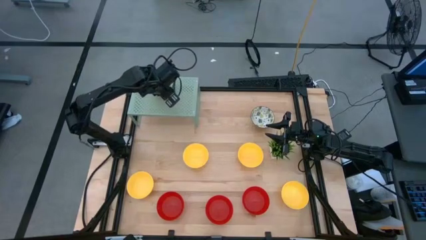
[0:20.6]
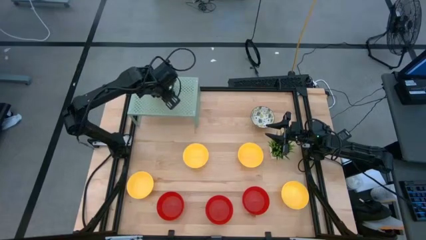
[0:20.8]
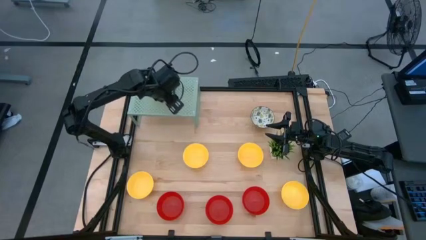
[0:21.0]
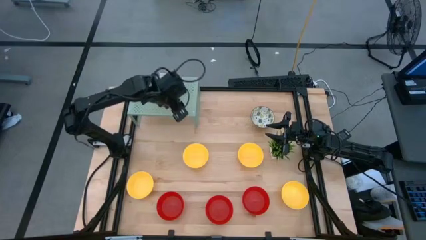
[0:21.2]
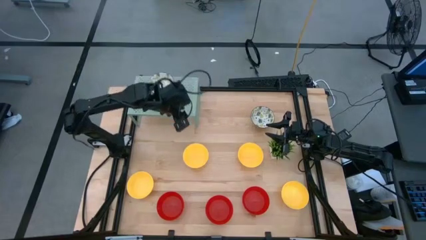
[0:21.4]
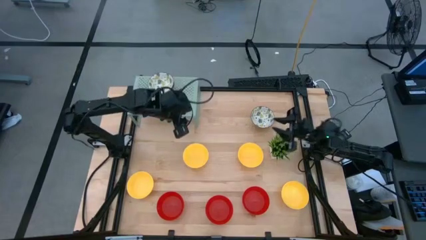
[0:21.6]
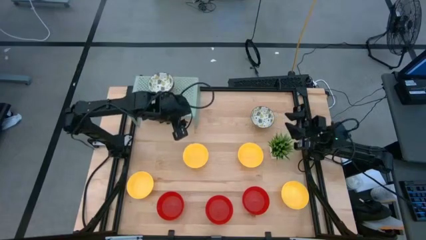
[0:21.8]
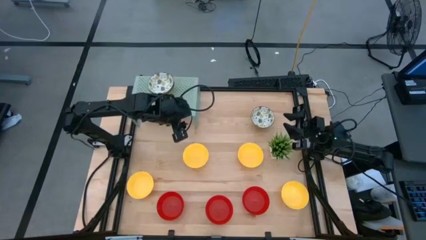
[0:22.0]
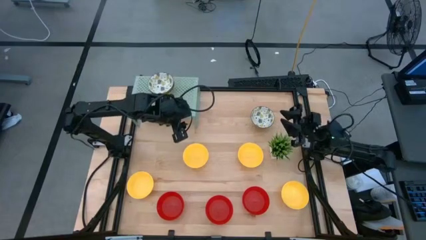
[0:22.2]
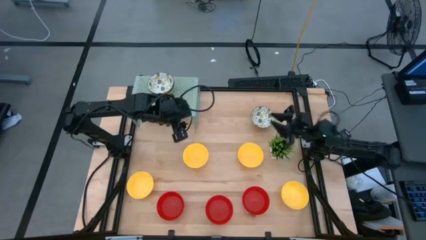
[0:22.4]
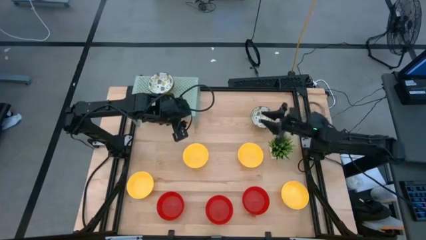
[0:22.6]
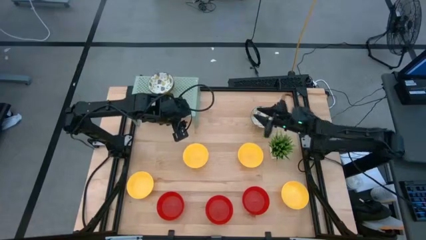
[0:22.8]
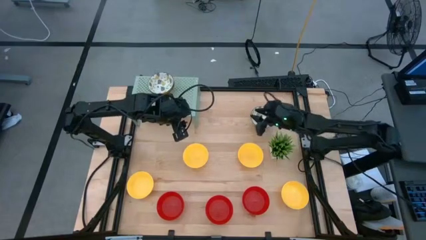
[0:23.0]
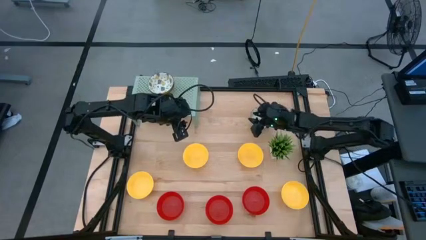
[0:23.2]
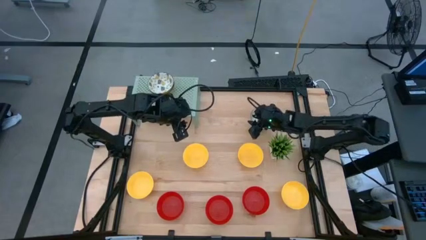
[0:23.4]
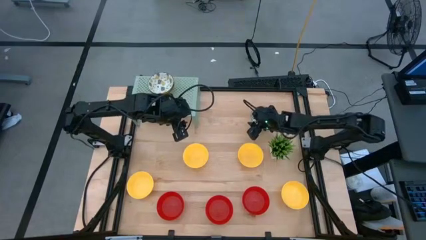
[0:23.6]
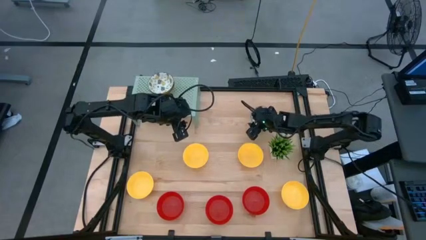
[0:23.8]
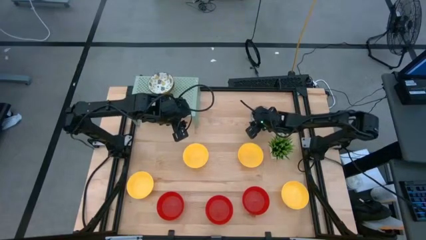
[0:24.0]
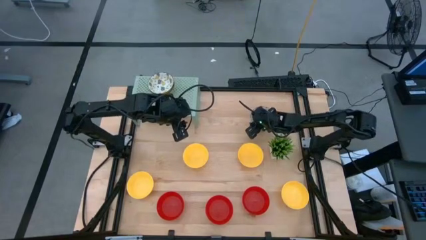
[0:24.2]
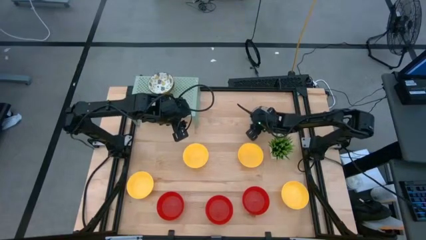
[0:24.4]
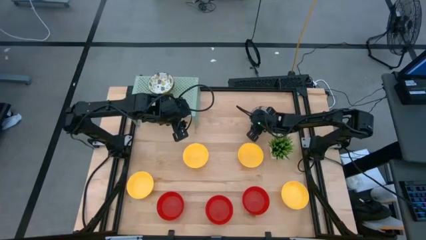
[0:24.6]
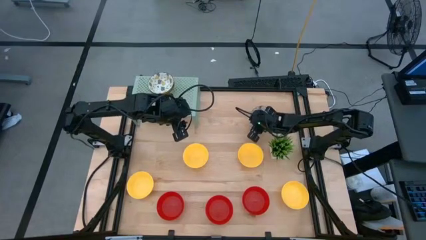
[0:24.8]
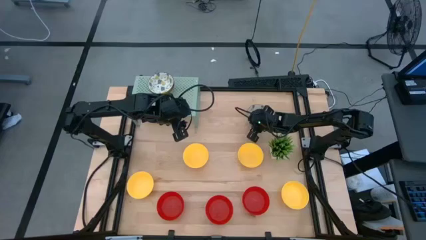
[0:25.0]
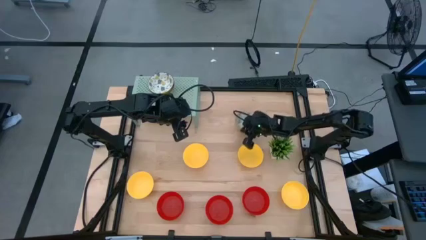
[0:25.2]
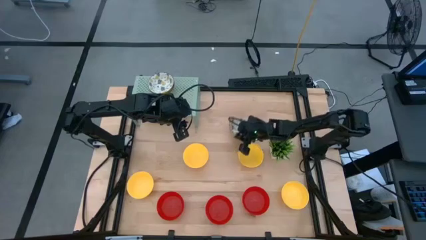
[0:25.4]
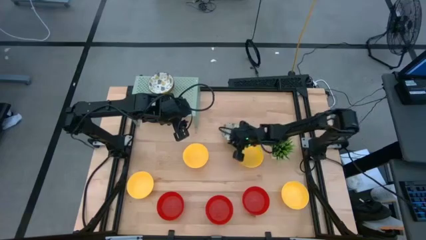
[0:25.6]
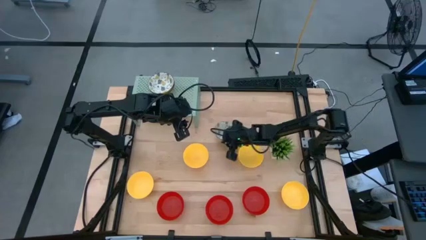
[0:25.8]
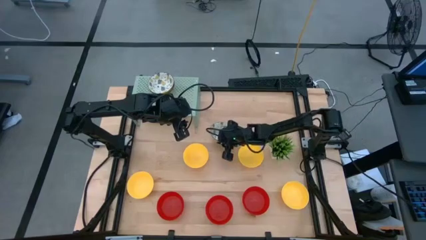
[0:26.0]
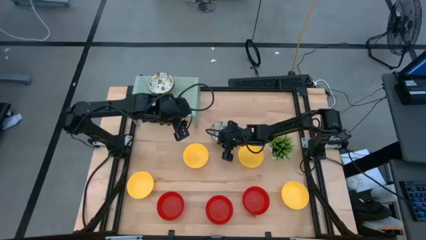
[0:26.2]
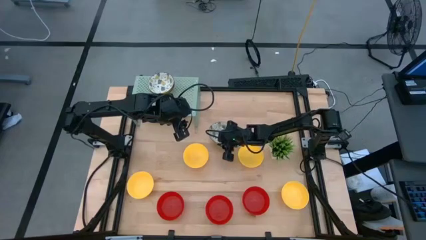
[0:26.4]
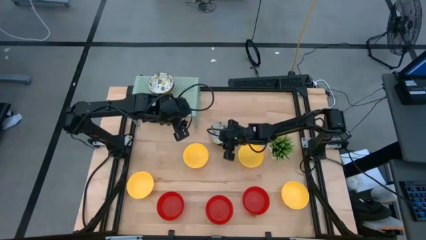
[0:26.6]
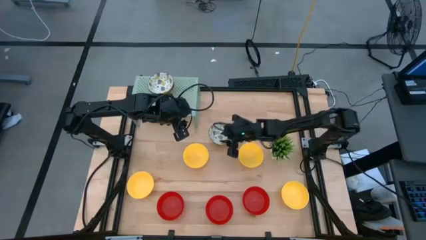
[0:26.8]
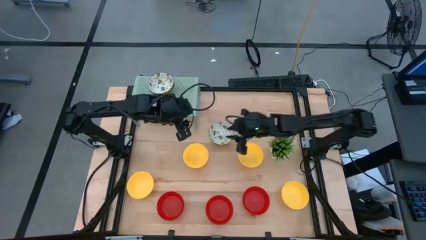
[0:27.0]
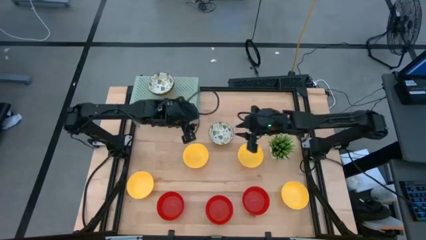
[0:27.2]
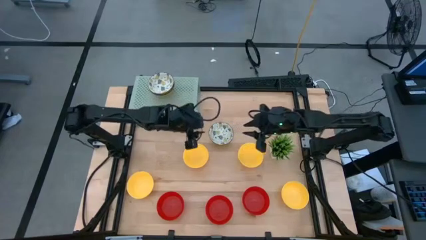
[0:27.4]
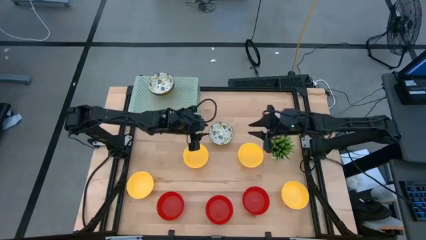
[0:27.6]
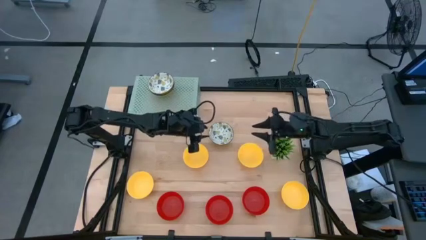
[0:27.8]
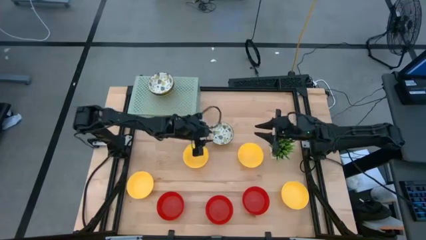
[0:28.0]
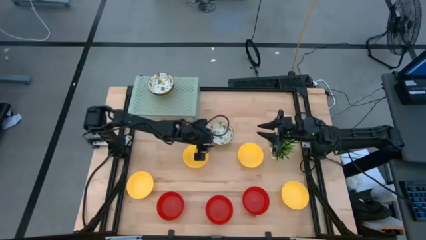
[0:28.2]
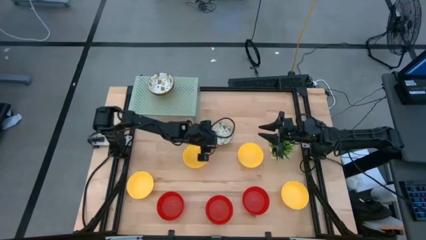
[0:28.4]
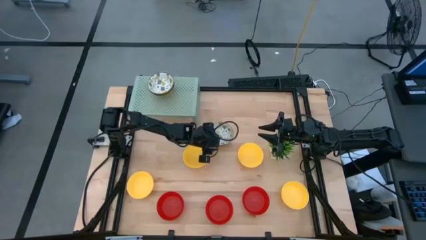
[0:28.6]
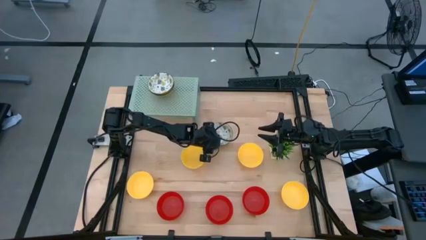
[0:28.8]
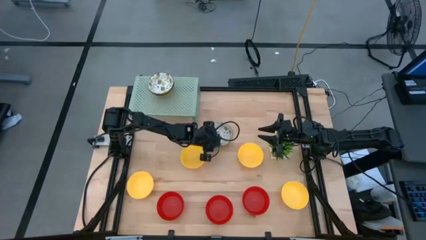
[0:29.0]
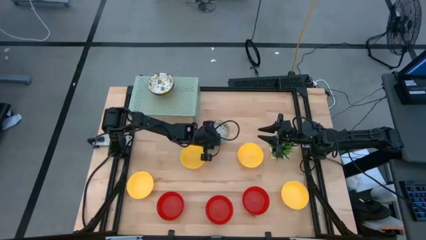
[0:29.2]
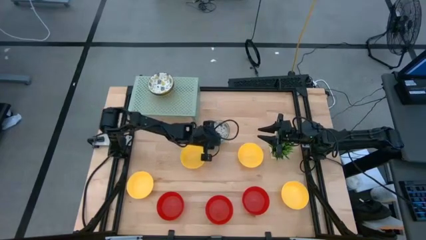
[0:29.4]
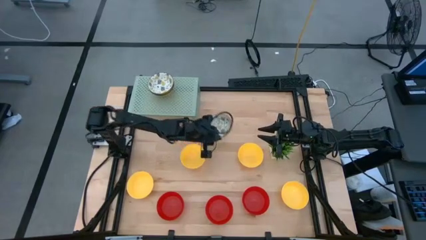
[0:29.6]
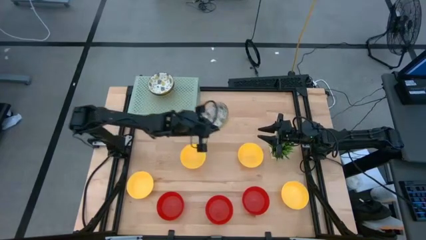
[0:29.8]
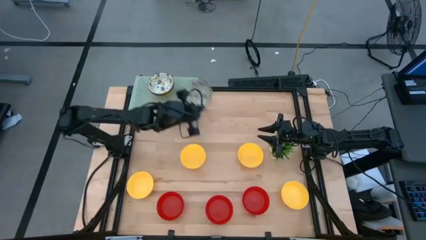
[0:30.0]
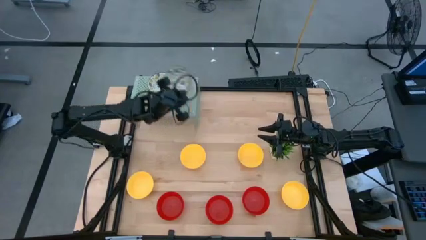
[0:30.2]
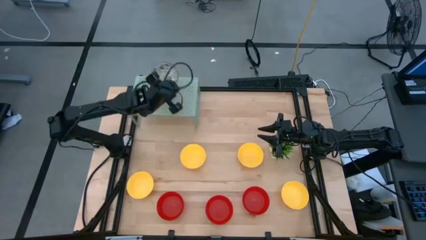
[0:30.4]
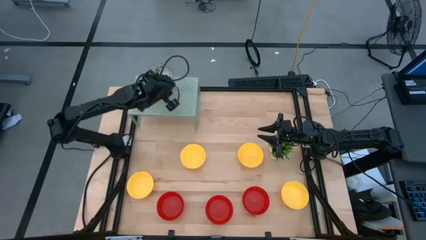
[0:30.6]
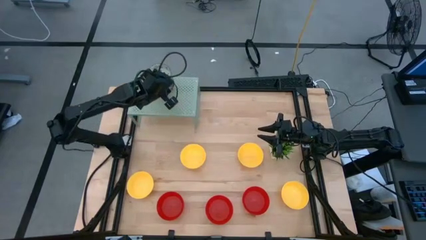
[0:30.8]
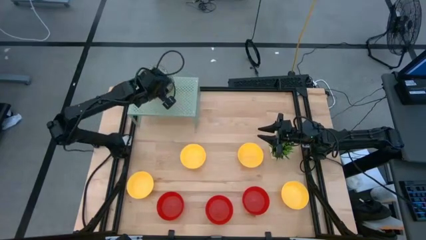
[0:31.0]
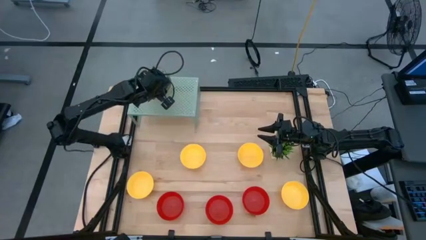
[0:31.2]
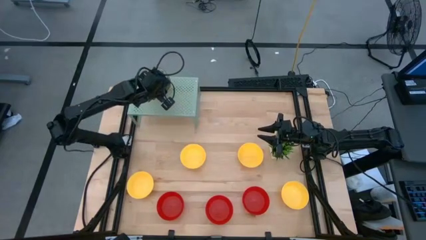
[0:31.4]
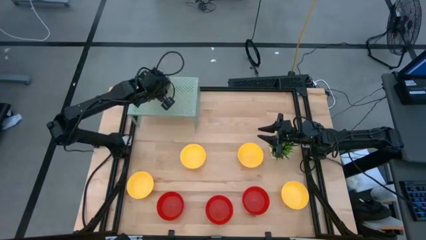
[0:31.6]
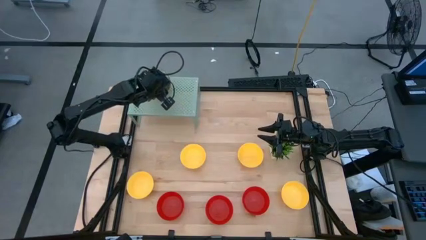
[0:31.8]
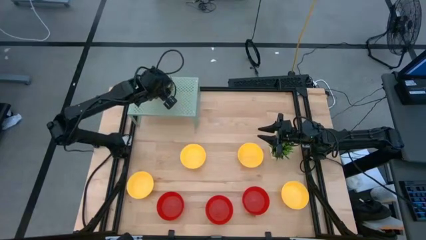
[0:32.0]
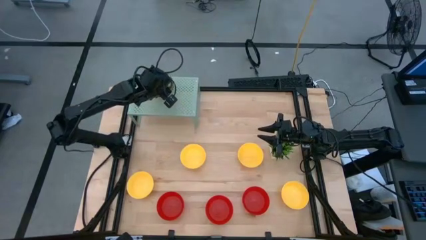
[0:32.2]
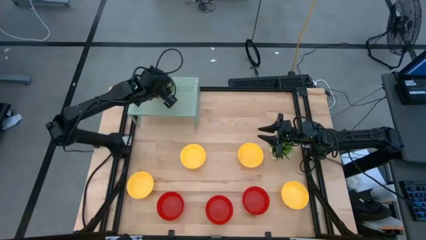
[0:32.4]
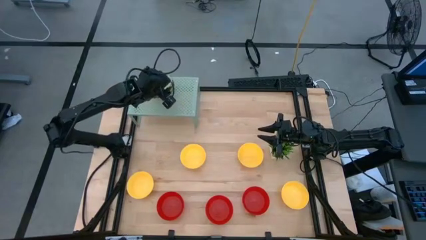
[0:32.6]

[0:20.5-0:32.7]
Task: Pick & Place Mini bowls
Stack the white bowl on the white bowl on the shelf

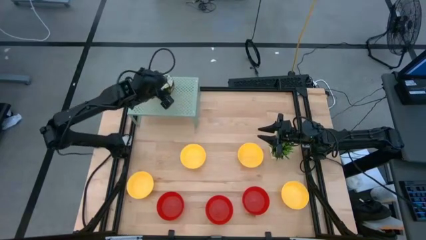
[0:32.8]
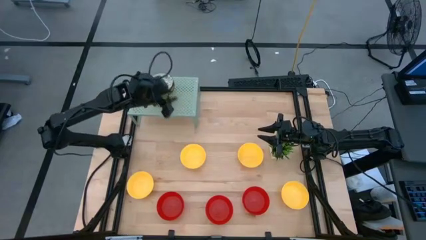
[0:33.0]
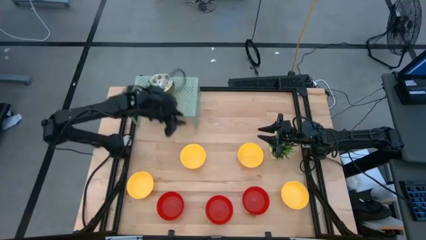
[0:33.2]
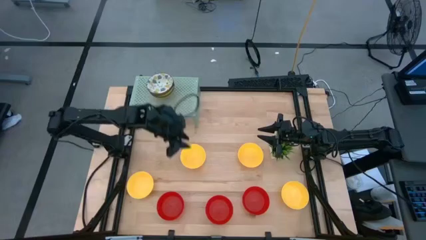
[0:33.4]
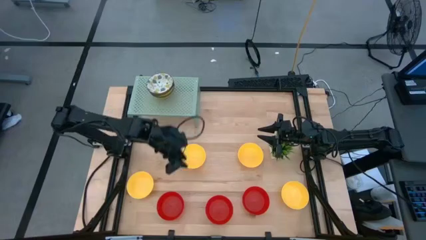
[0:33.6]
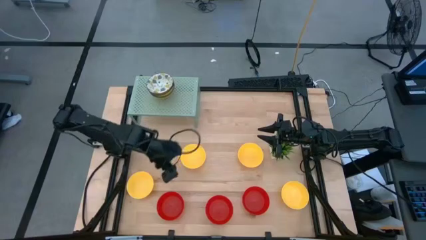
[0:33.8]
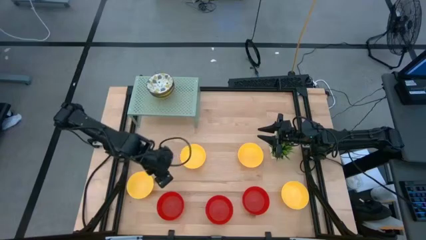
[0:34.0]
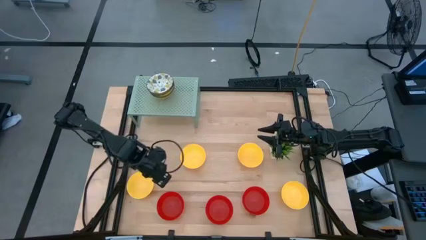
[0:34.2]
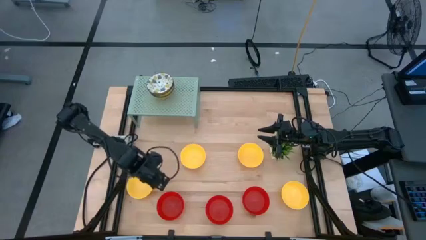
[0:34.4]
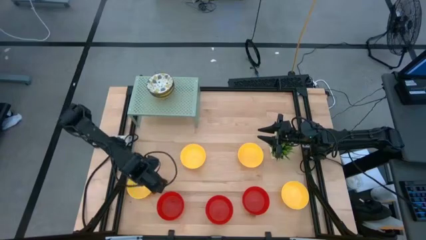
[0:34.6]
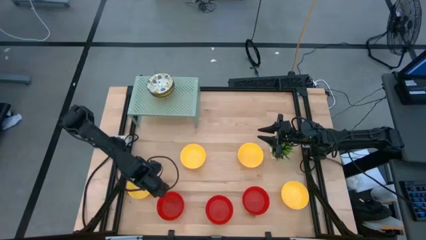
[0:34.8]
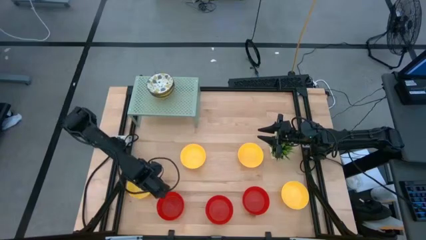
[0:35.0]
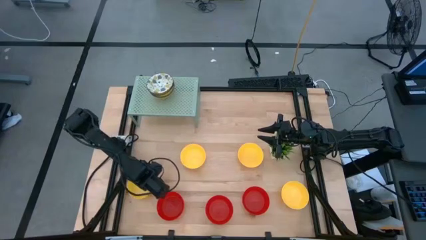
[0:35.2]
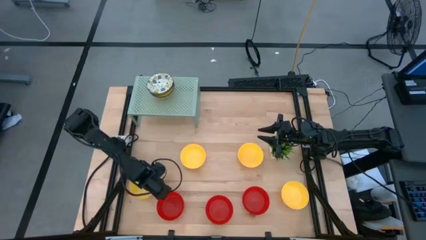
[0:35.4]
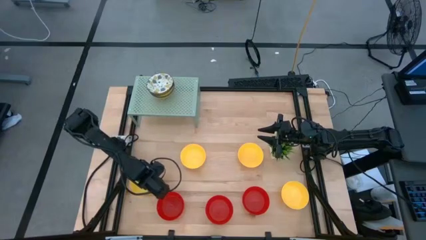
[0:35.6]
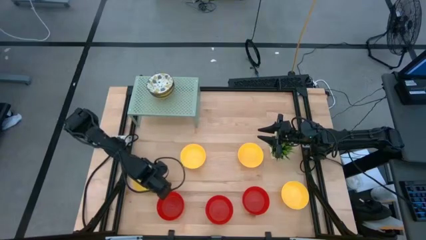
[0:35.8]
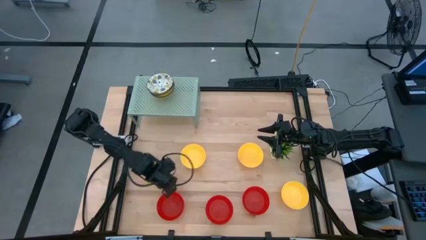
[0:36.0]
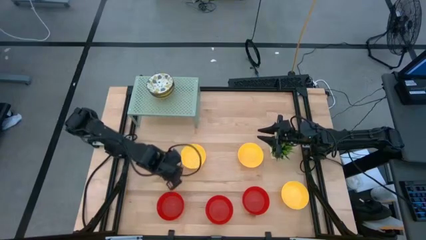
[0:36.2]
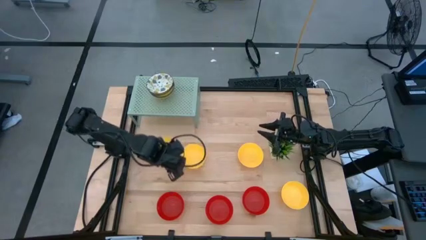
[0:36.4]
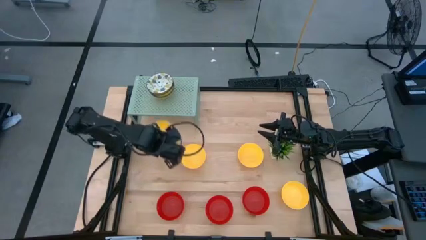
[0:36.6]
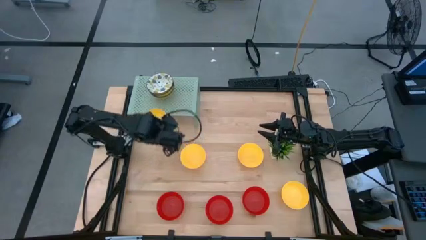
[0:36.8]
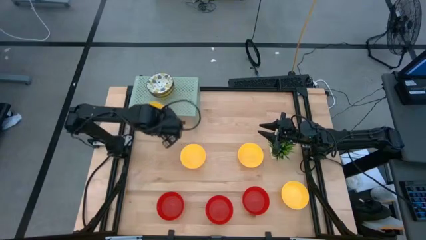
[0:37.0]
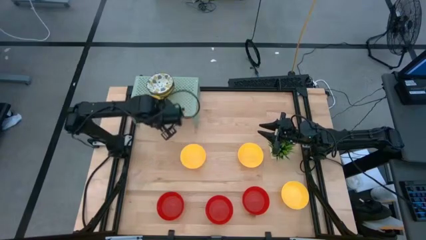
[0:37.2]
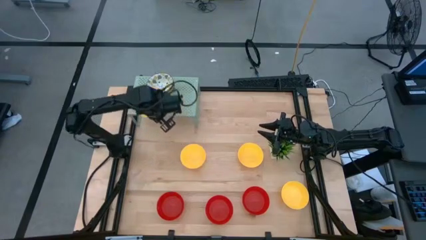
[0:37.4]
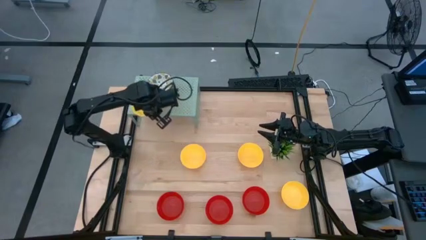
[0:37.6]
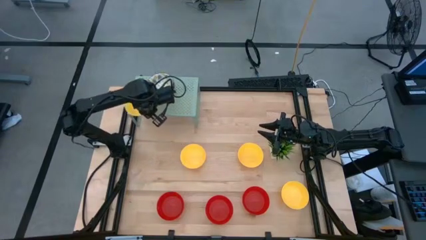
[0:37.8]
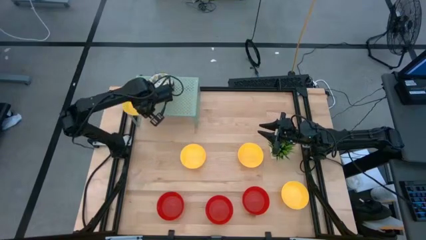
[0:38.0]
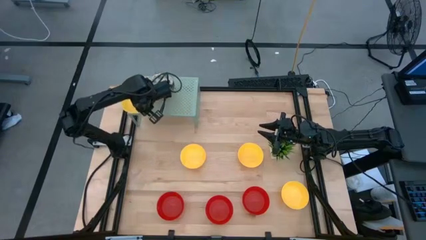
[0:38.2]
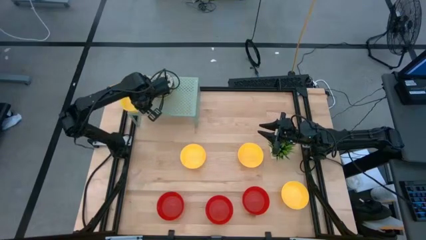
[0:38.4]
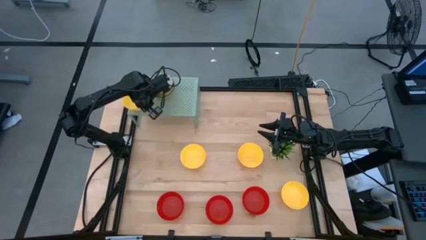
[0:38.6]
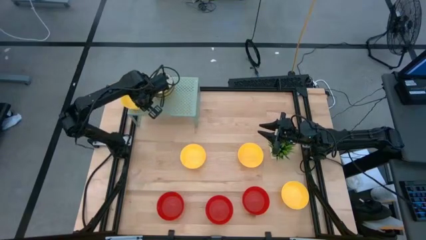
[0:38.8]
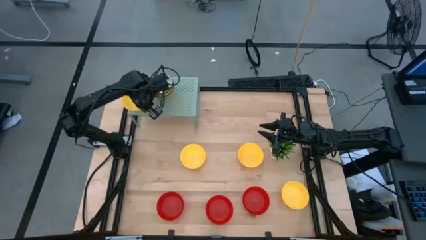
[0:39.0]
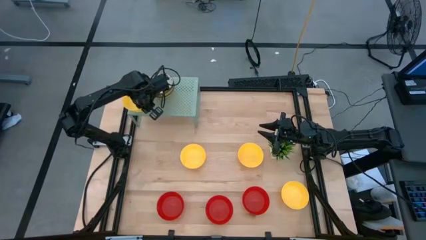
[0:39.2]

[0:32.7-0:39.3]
Put the yellow bowl on the shelf
